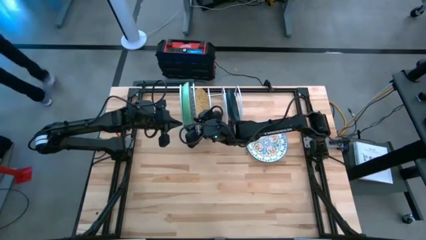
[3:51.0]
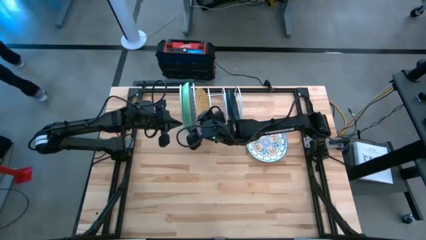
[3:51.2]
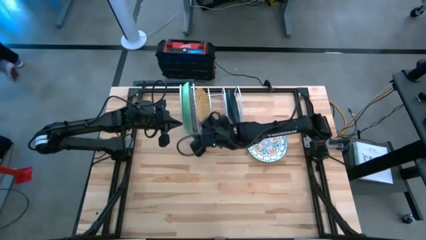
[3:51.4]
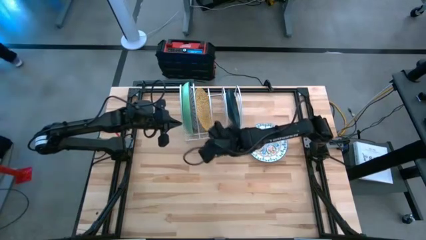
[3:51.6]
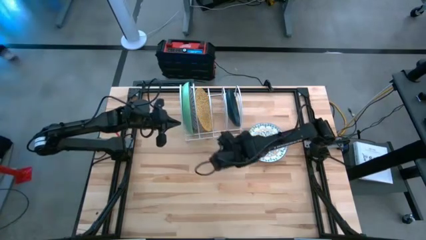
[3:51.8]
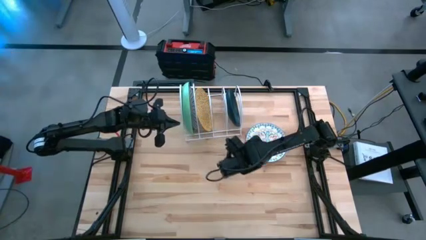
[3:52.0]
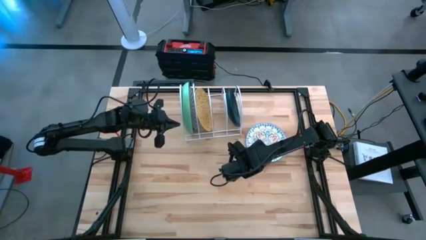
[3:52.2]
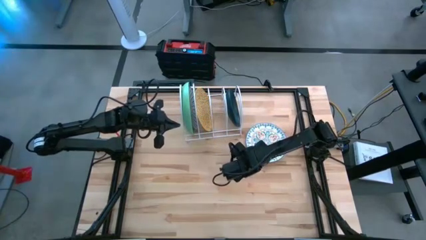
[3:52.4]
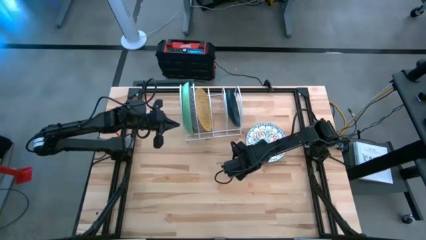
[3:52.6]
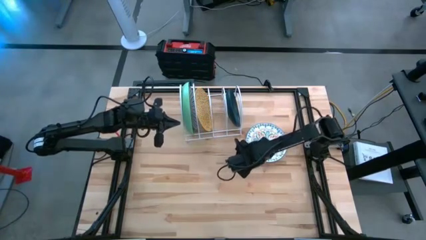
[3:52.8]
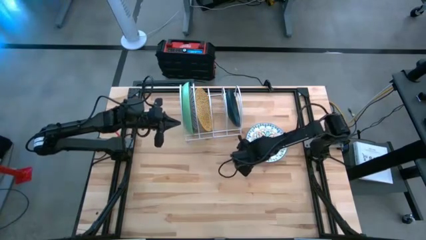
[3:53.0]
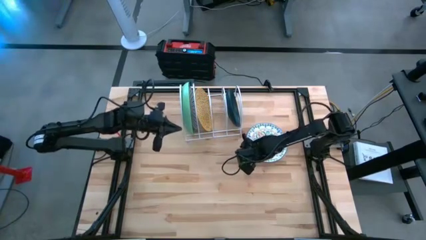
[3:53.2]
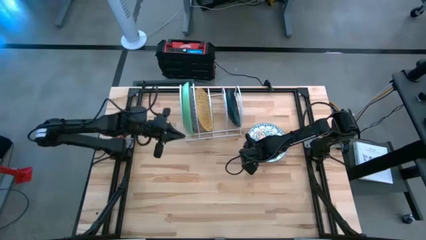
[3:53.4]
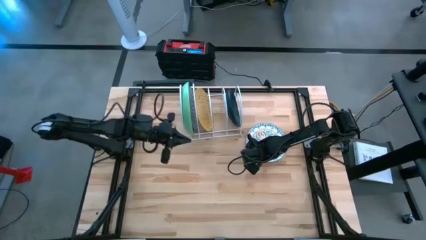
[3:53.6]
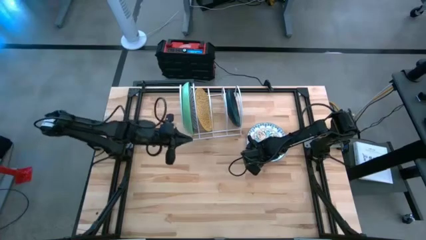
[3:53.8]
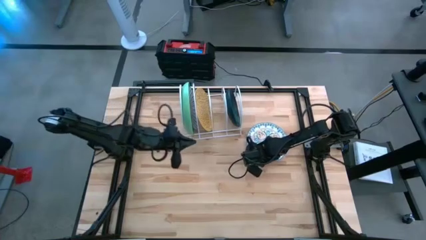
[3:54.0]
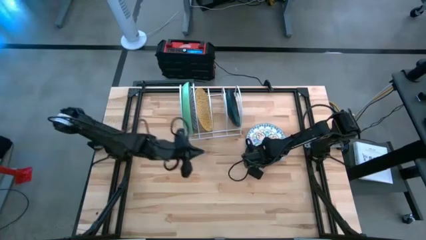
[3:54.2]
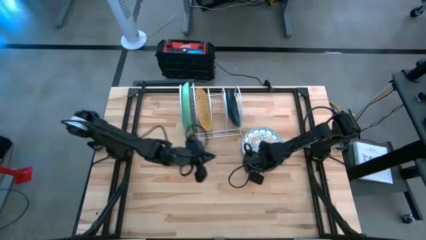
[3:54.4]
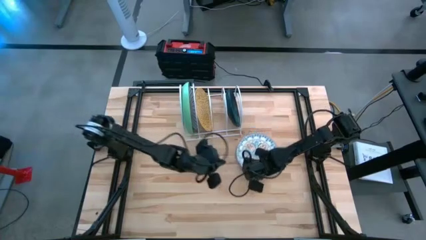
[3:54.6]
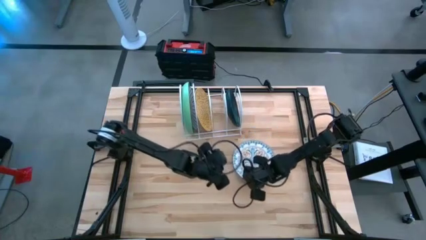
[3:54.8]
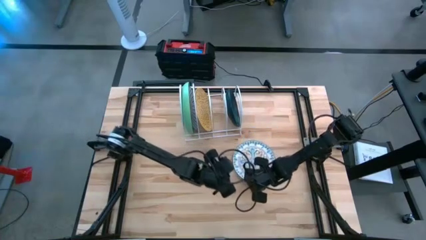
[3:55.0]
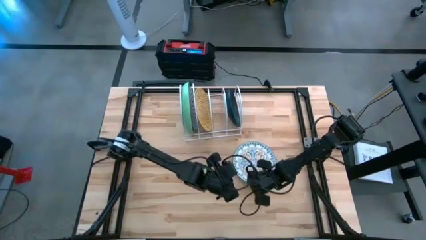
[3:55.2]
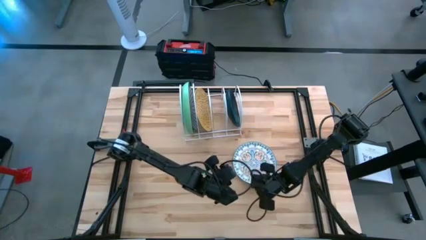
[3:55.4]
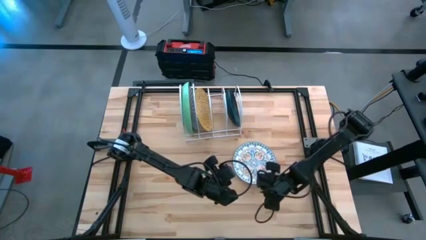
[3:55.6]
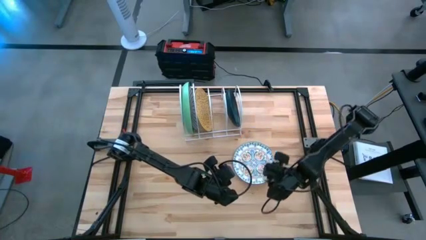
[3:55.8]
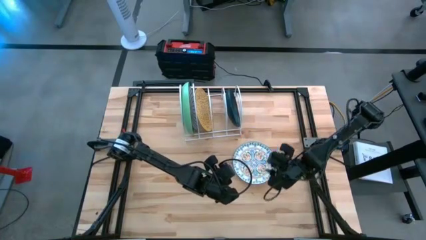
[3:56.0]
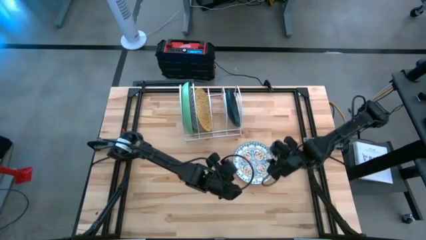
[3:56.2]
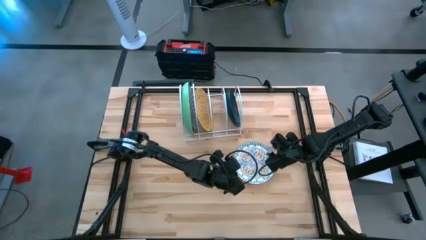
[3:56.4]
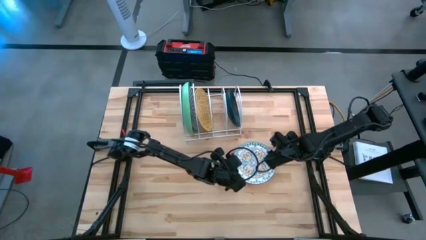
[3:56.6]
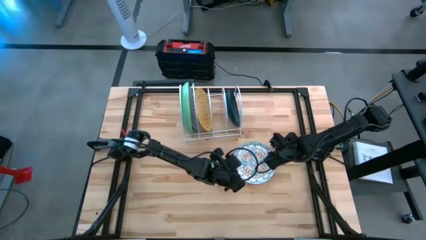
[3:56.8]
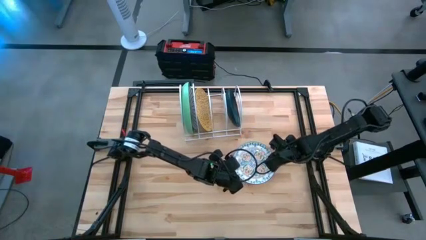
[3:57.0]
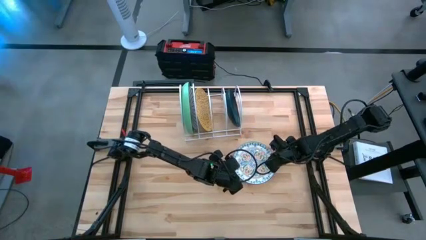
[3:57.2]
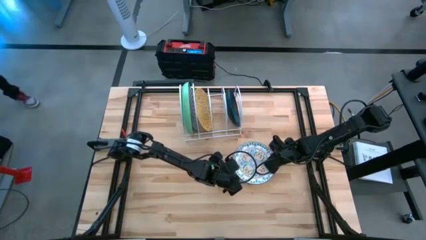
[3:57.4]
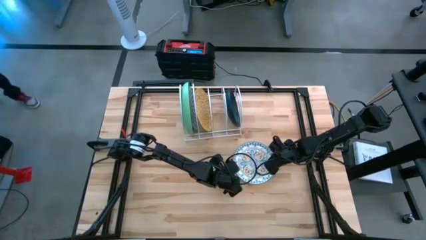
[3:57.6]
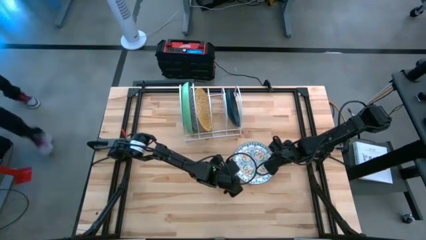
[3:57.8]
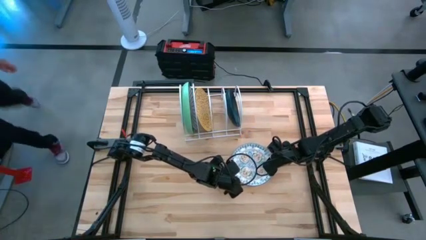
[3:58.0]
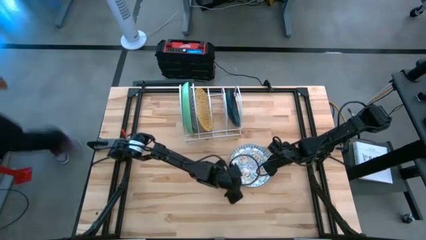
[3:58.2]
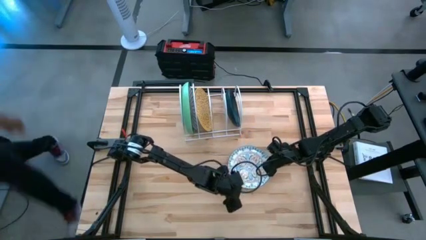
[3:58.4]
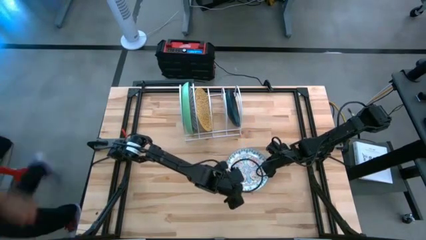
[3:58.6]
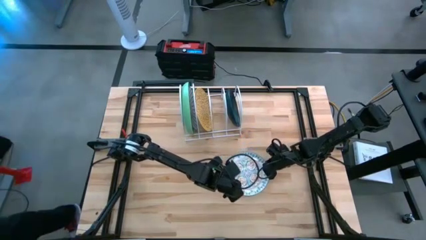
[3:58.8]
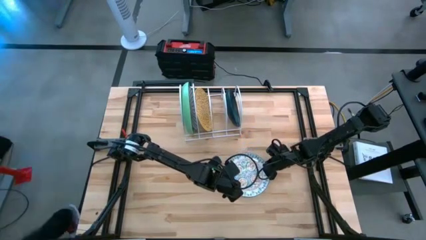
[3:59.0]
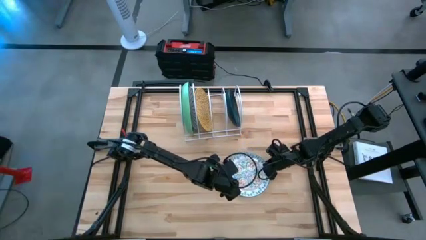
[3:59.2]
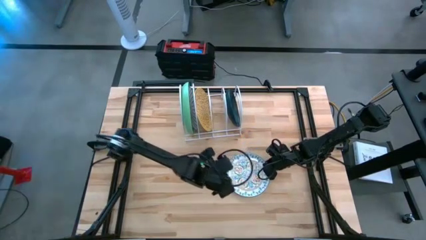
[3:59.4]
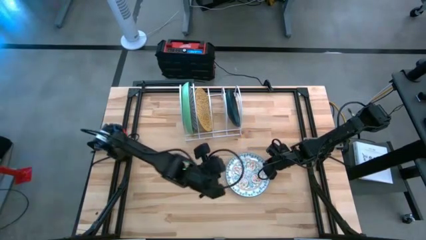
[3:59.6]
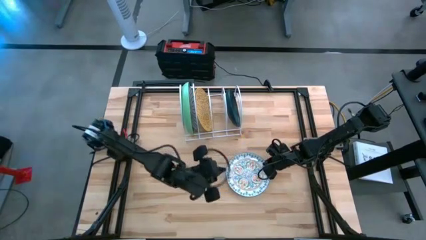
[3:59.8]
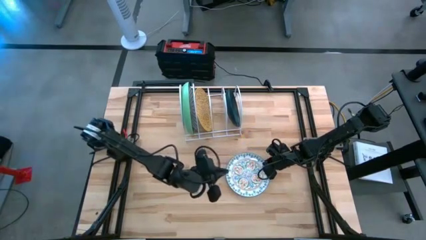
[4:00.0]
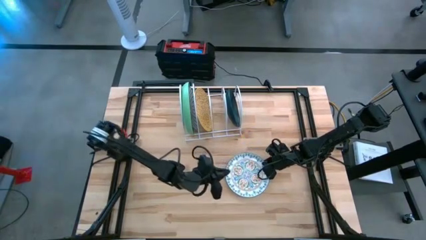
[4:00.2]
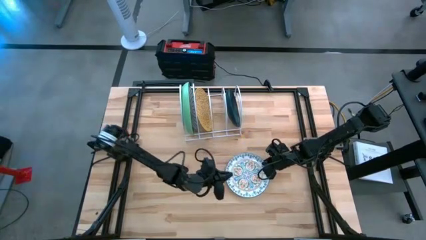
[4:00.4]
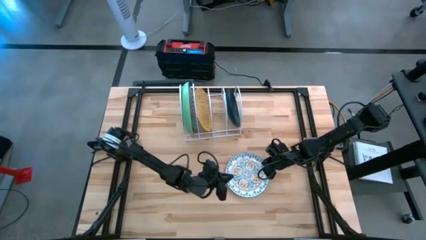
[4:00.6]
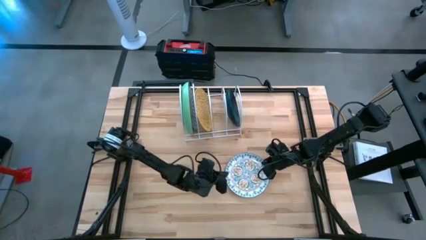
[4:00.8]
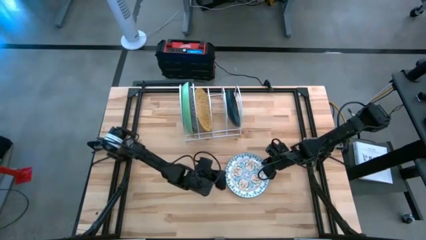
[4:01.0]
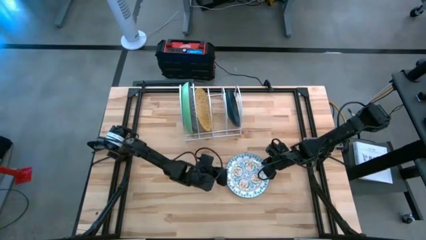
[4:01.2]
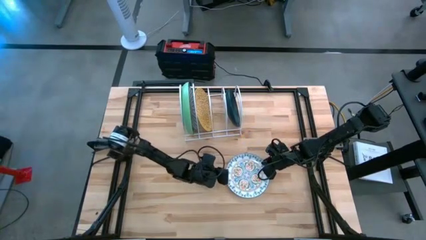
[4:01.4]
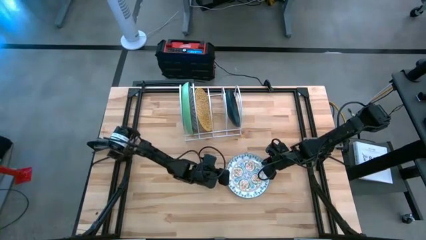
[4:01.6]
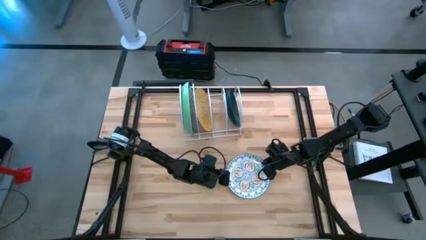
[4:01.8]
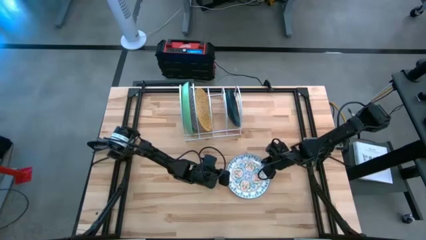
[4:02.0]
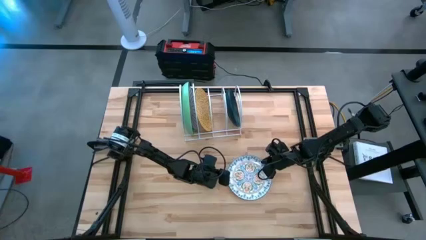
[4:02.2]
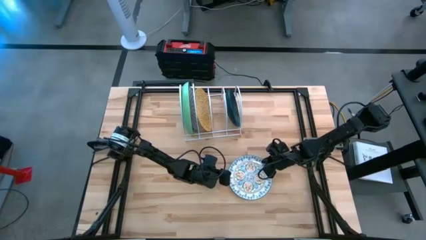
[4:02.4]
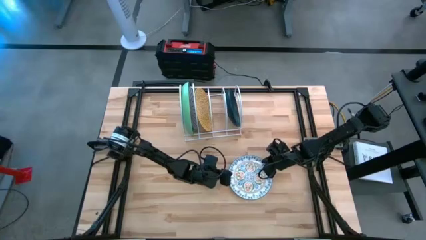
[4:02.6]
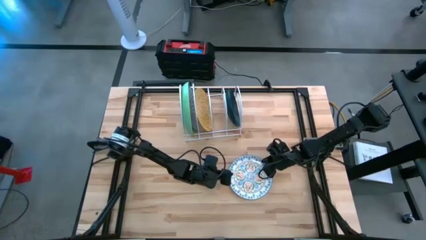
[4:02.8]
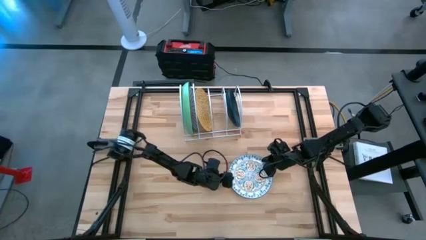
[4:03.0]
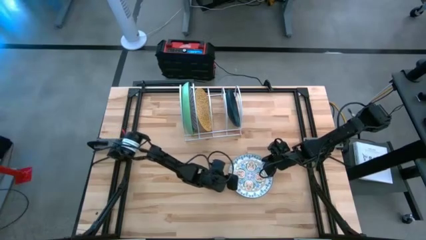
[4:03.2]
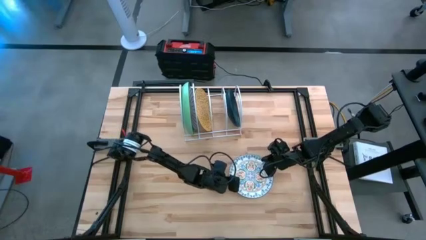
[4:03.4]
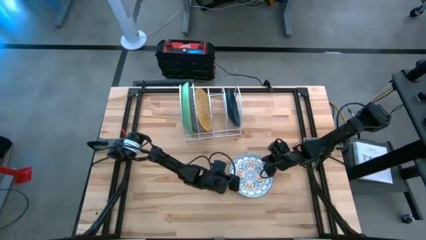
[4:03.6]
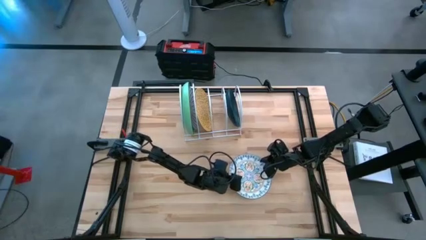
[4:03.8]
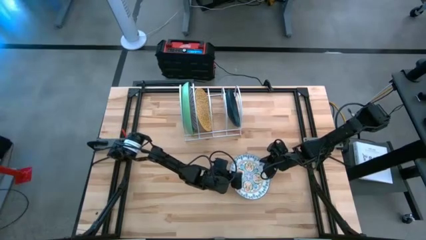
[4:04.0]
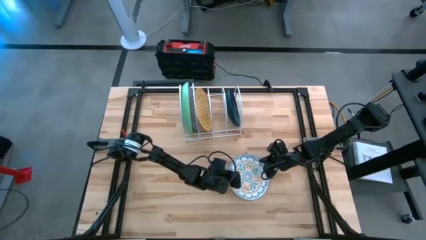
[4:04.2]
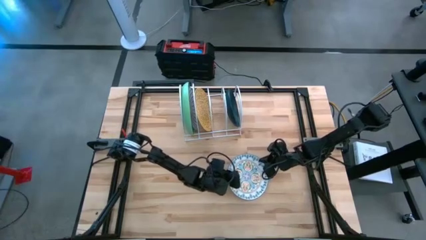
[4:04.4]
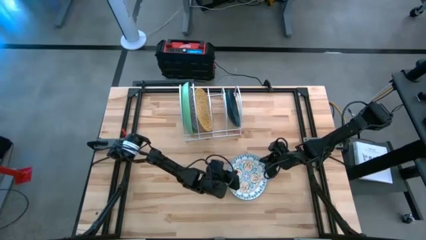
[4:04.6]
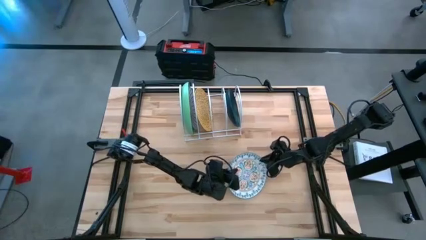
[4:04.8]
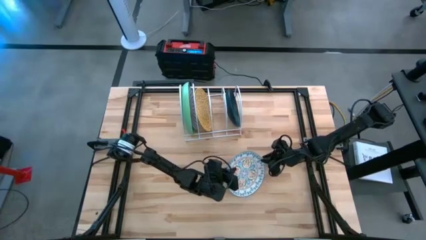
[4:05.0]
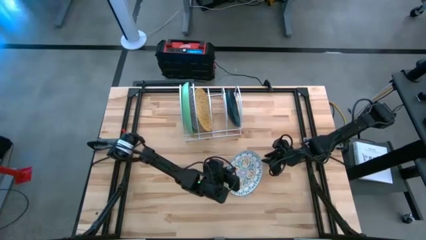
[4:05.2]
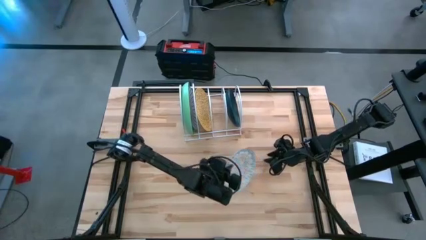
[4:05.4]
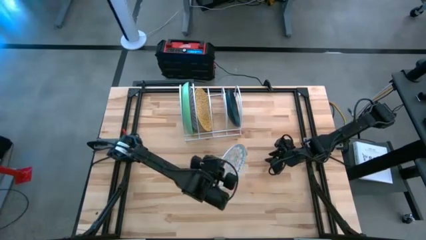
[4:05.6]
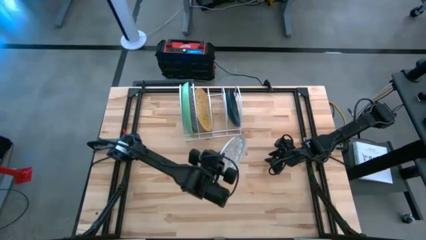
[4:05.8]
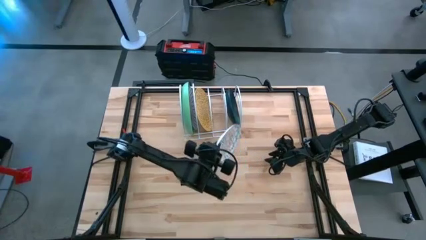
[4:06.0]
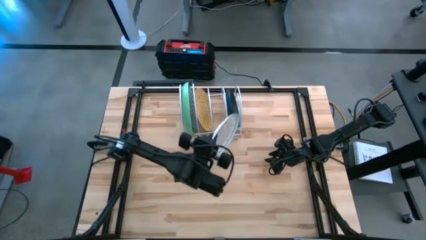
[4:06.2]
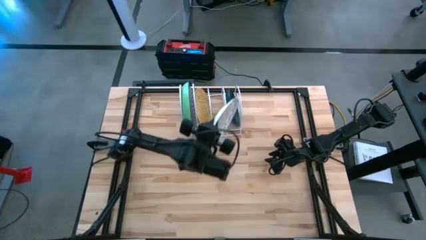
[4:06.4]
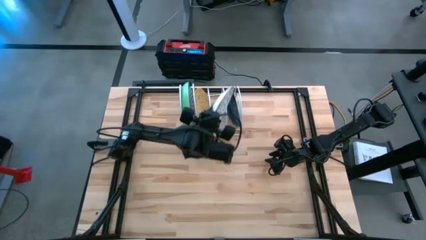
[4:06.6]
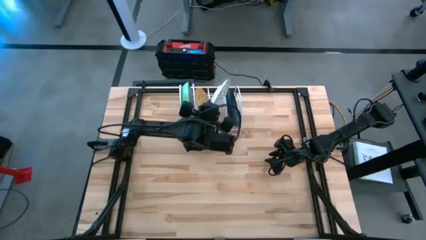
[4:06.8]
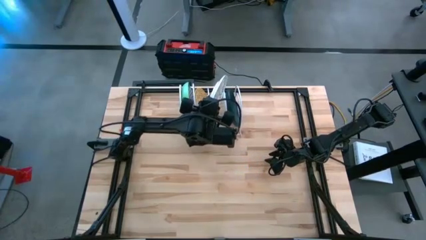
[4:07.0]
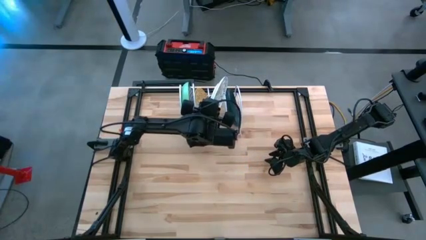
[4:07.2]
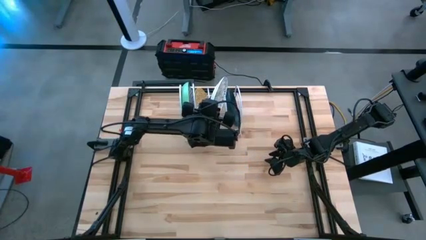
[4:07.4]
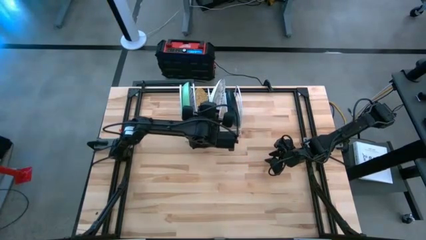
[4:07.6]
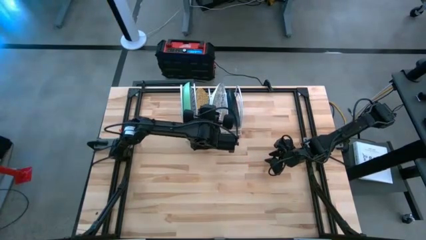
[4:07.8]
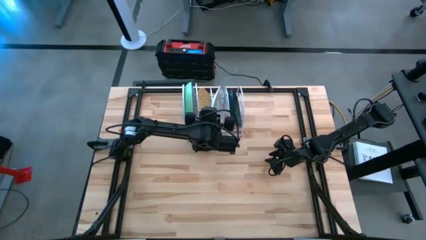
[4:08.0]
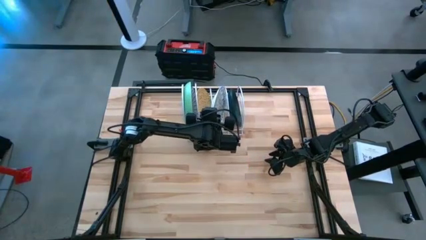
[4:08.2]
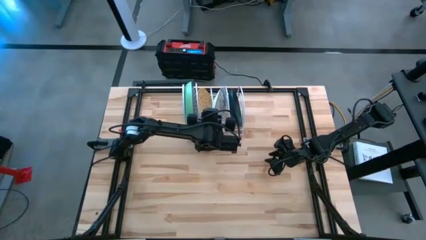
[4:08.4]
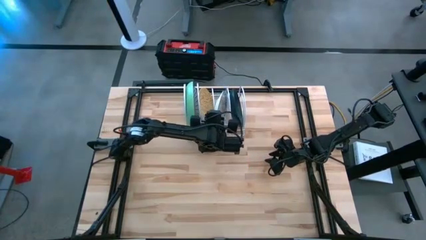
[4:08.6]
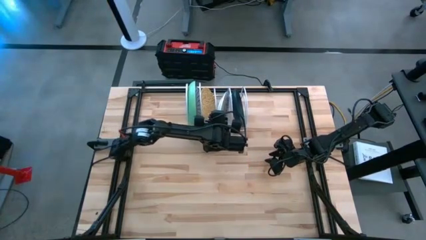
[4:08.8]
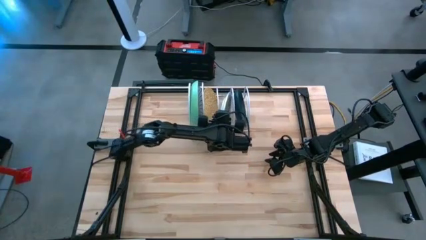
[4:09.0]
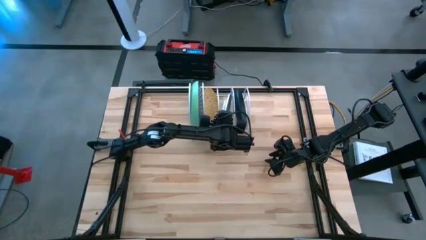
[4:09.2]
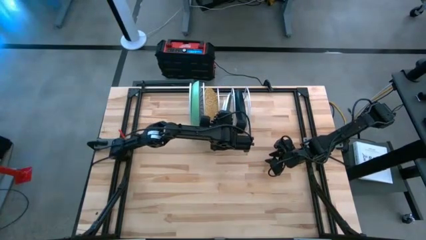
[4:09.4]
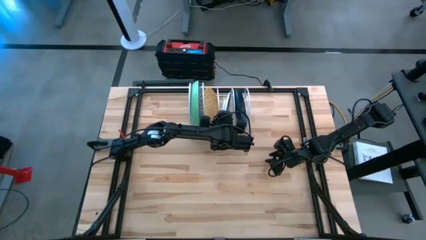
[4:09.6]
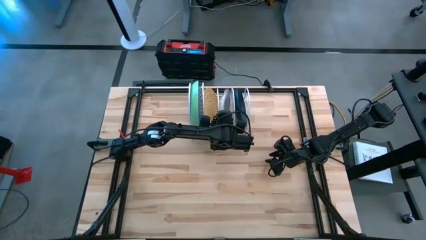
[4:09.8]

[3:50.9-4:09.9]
Task: Sort dishes
Put the white plate in the dish rack
